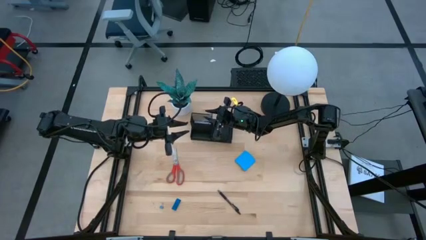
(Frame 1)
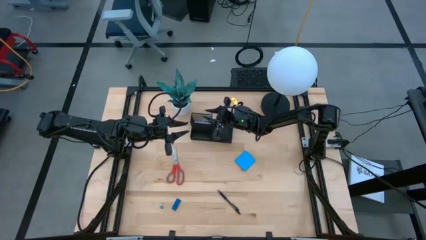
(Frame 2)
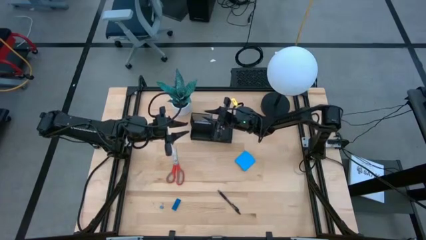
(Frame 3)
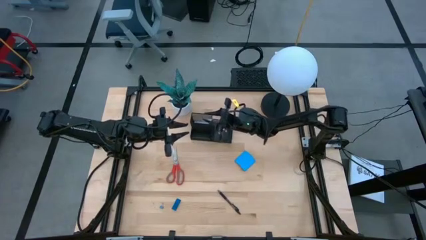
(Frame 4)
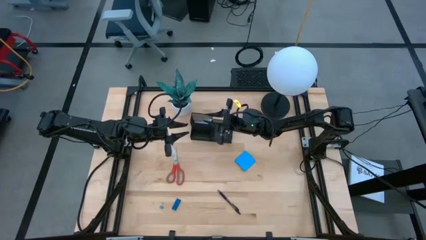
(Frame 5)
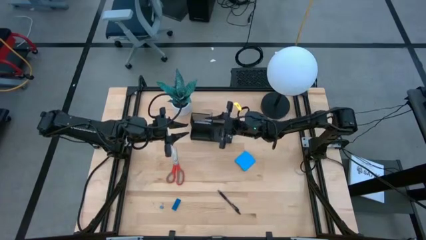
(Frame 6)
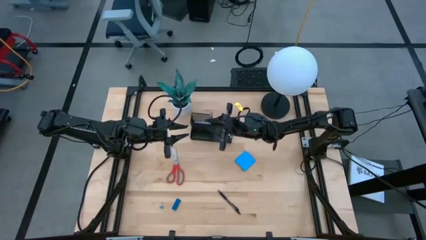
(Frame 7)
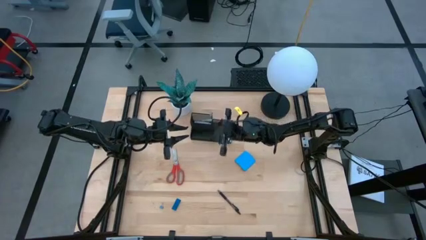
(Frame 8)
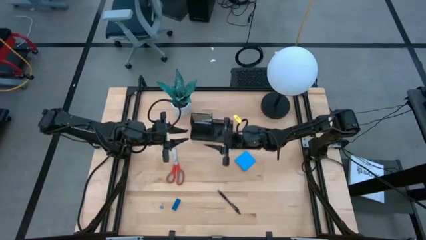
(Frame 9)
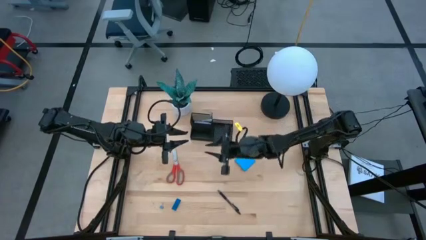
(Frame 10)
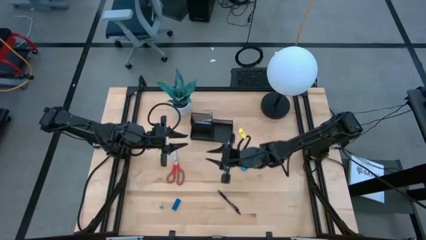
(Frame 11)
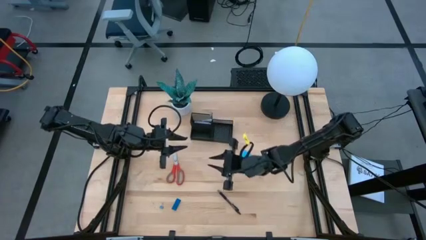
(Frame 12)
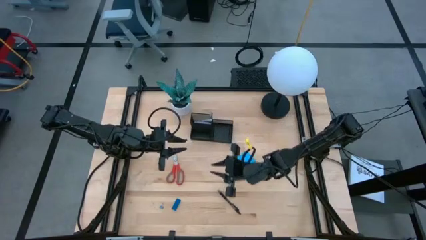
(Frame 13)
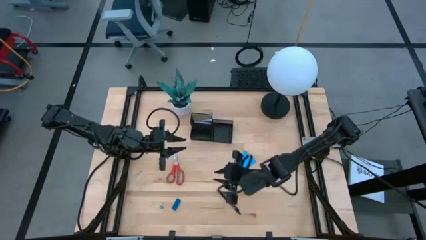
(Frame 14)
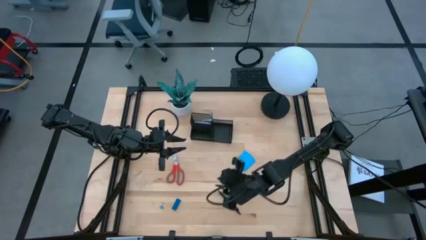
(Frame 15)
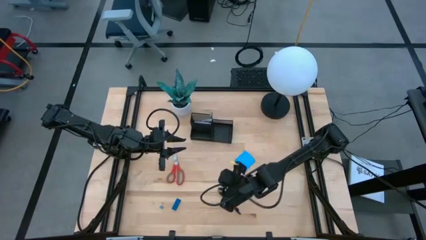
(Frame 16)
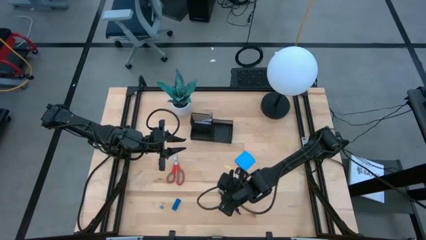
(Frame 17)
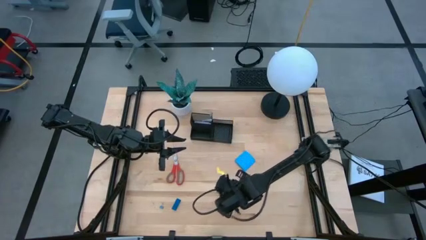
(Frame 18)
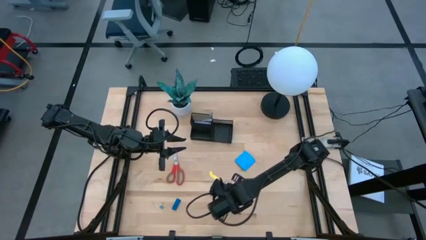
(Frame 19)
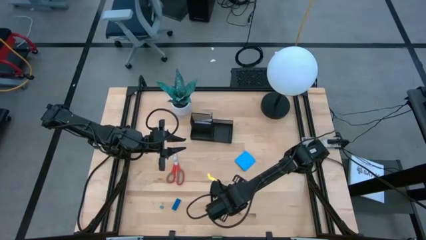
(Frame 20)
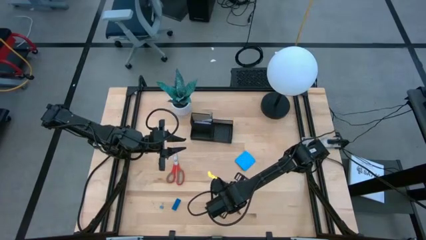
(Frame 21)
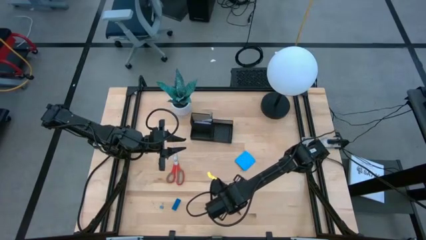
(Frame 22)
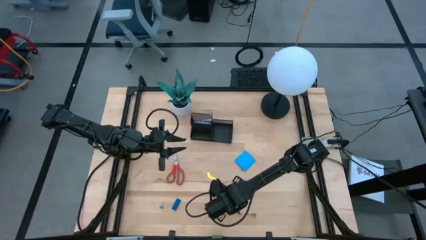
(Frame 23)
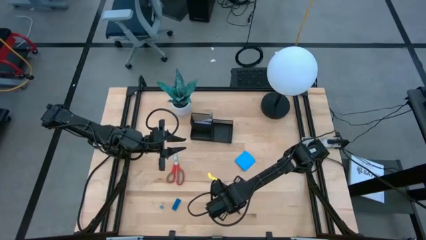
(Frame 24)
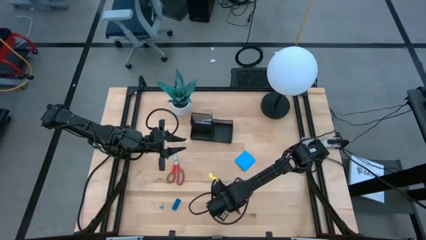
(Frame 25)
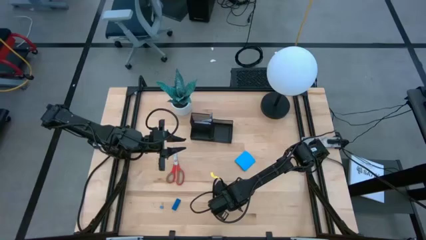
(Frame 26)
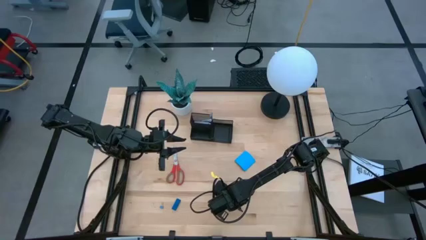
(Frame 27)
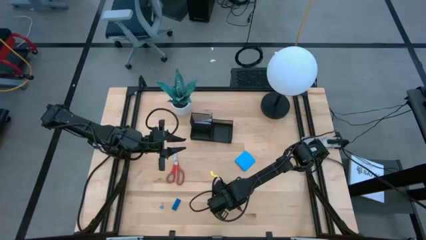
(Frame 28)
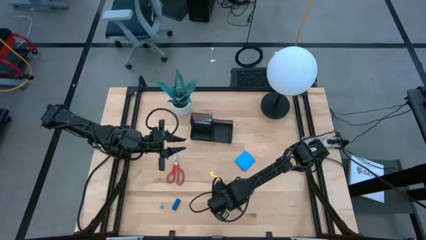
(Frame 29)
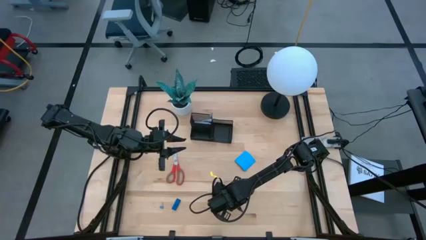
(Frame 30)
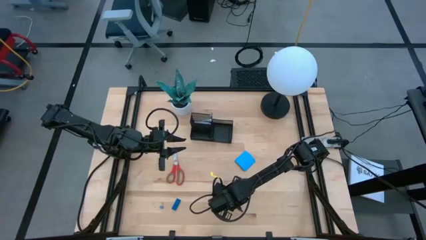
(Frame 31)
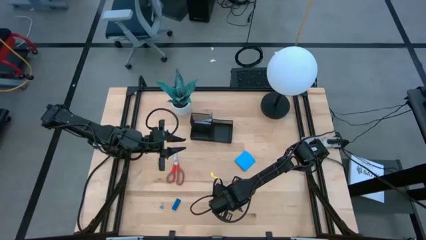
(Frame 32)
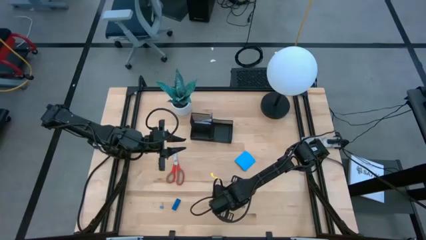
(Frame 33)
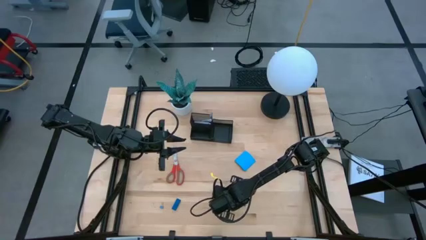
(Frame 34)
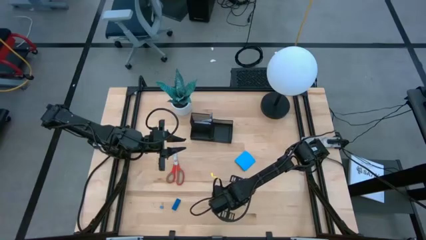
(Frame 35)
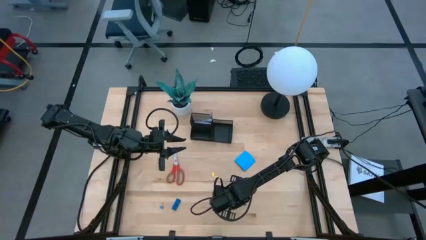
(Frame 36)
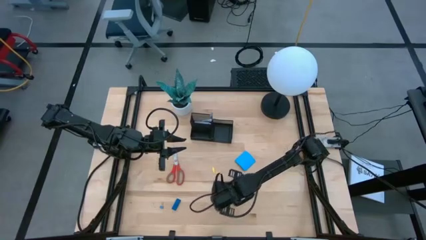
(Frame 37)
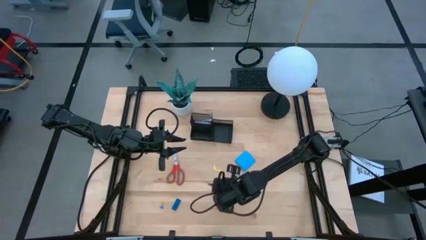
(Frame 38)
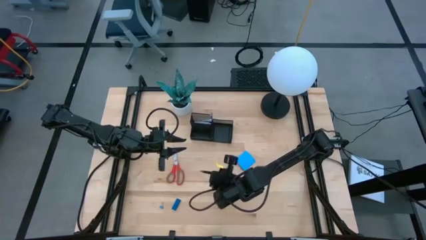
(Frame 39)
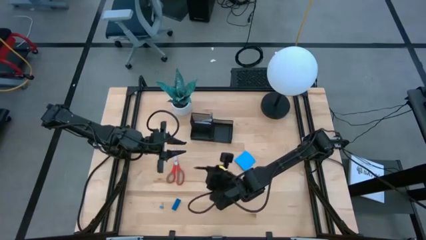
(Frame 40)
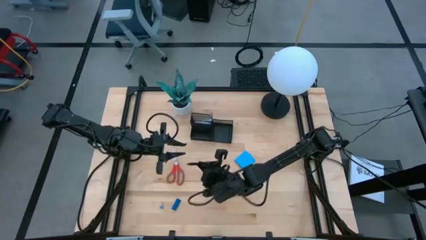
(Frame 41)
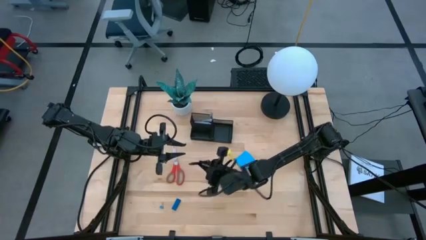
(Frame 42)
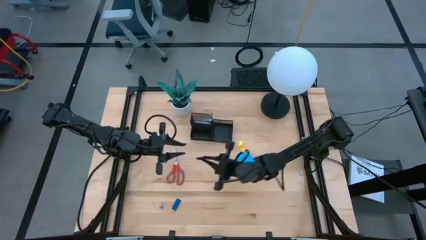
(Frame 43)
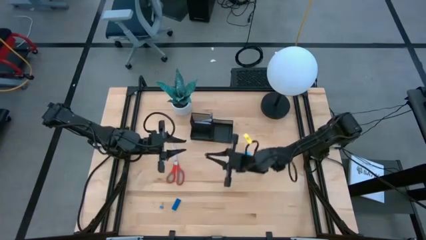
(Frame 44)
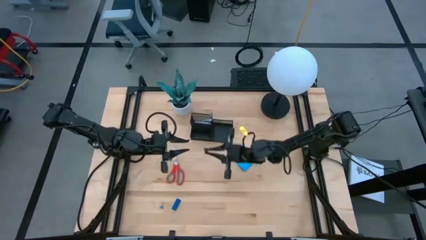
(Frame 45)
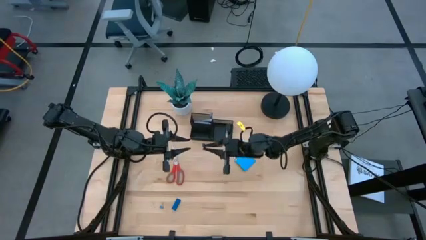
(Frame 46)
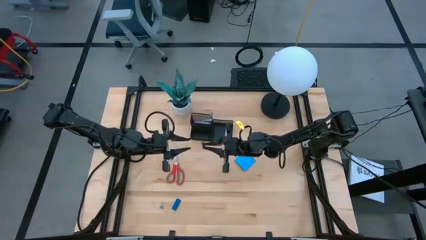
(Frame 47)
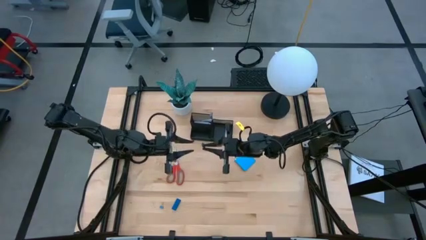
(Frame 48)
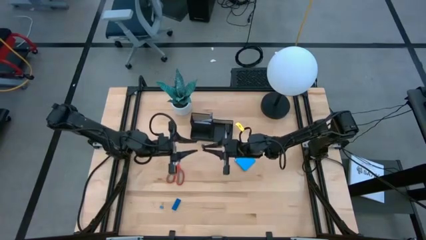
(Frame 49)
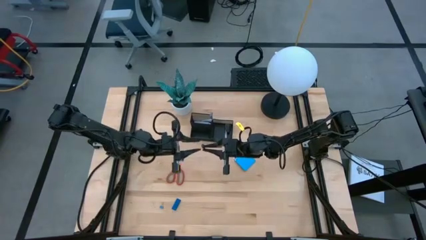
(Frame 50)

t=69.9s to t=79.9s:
Task: Pick and place office supplies into organizer
Put the black pen into the black desk organizer

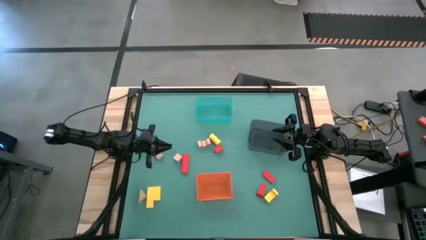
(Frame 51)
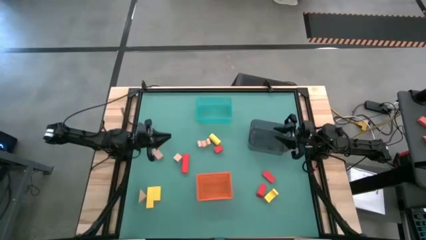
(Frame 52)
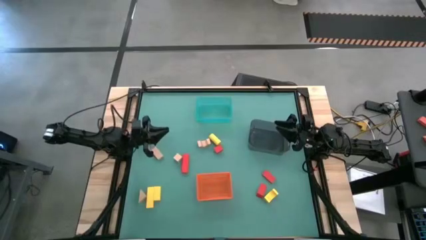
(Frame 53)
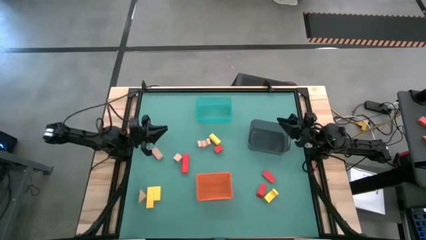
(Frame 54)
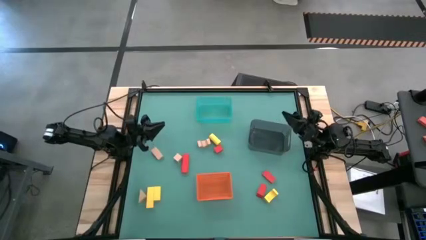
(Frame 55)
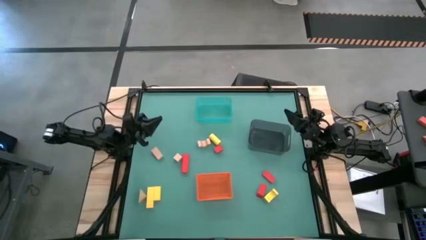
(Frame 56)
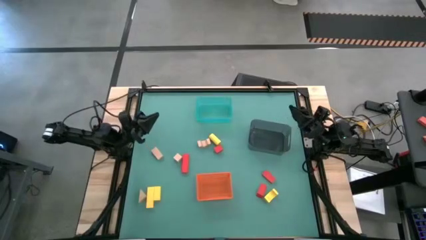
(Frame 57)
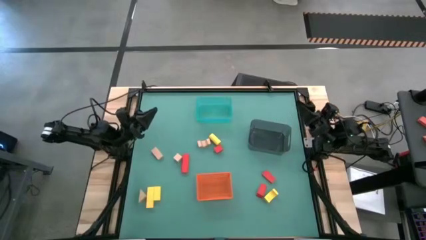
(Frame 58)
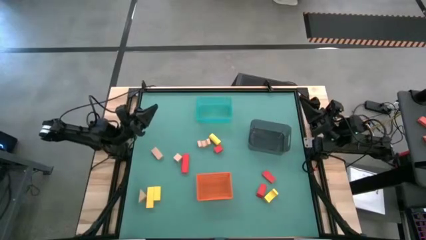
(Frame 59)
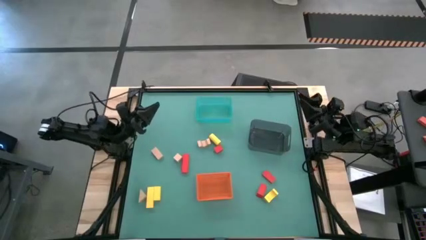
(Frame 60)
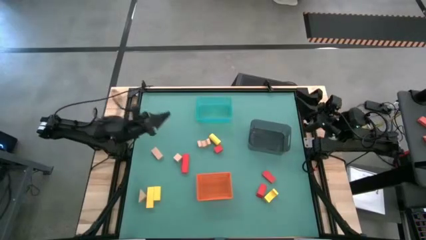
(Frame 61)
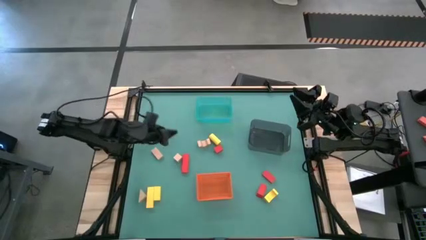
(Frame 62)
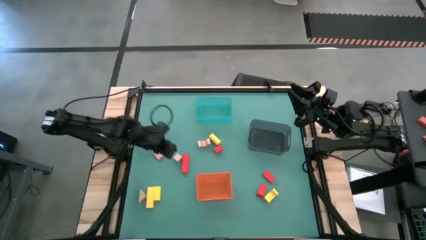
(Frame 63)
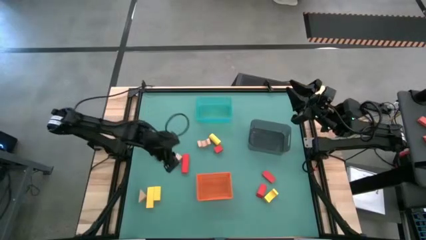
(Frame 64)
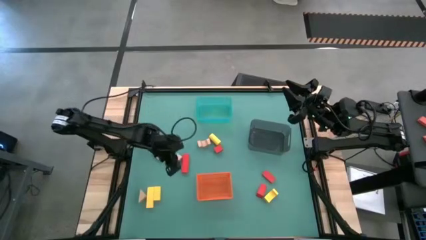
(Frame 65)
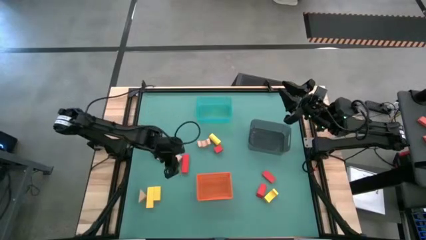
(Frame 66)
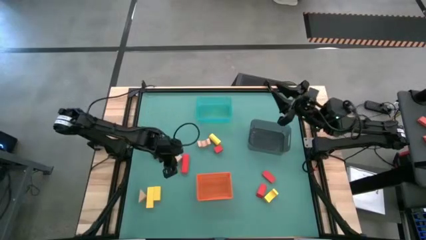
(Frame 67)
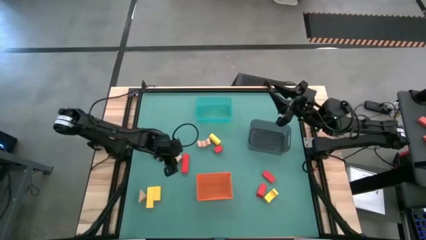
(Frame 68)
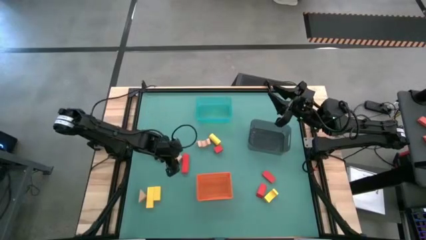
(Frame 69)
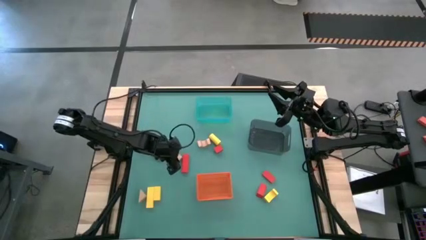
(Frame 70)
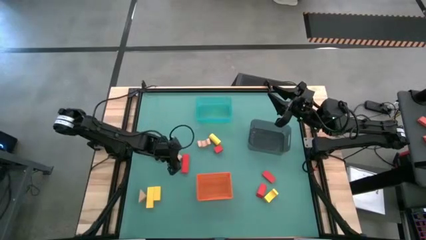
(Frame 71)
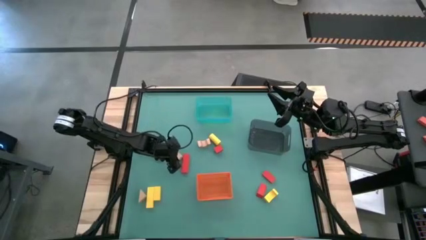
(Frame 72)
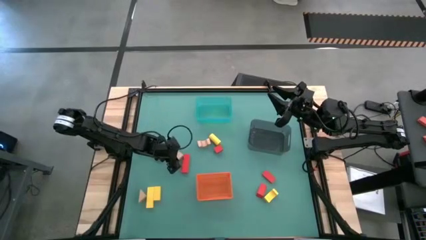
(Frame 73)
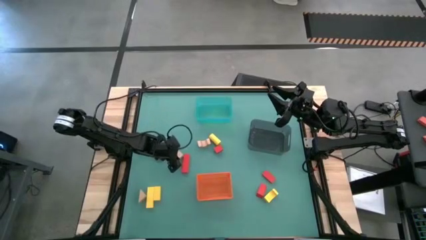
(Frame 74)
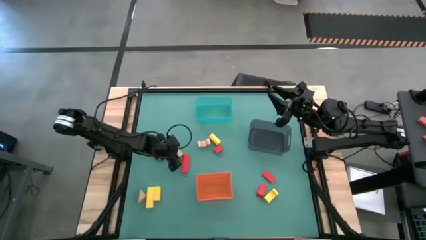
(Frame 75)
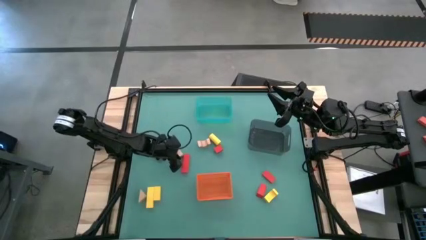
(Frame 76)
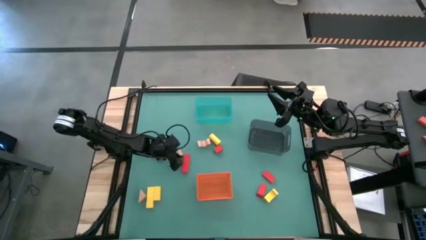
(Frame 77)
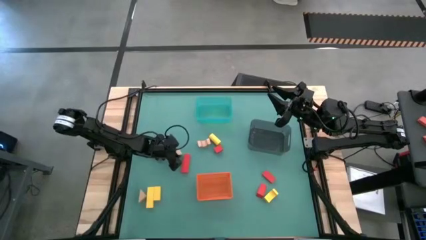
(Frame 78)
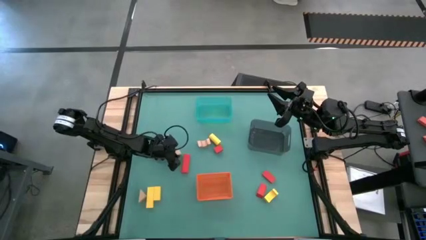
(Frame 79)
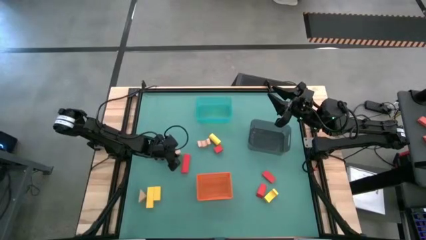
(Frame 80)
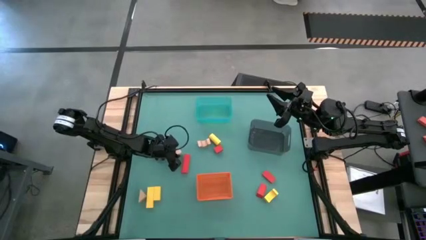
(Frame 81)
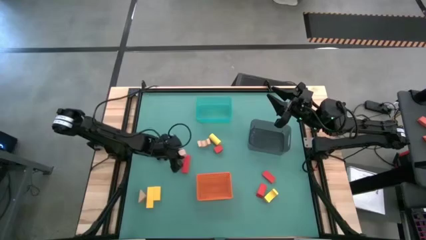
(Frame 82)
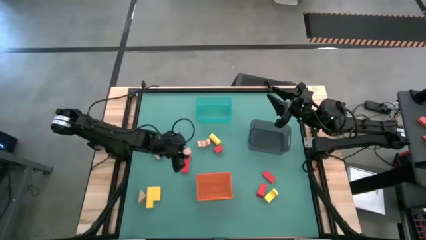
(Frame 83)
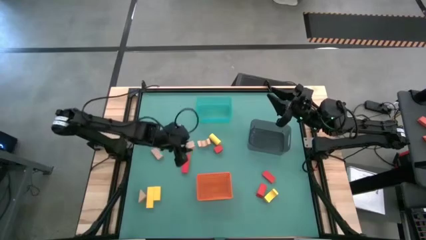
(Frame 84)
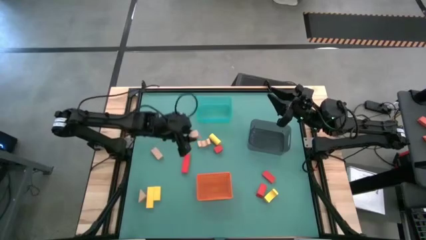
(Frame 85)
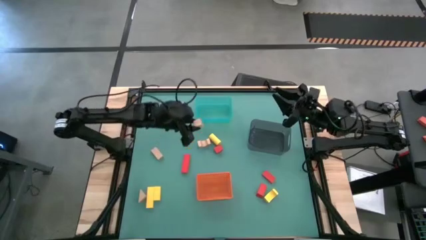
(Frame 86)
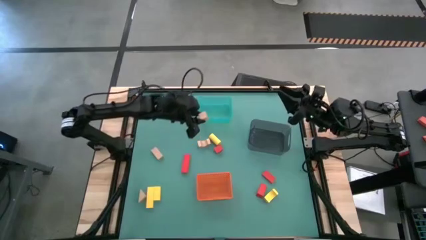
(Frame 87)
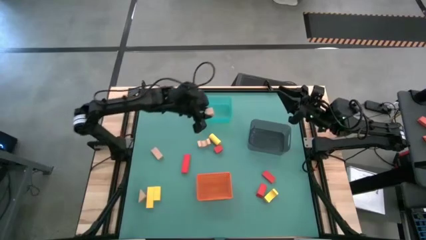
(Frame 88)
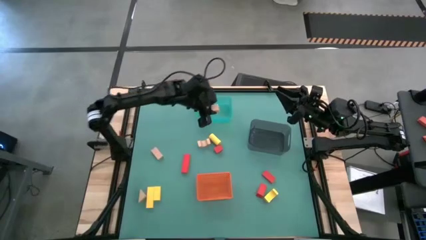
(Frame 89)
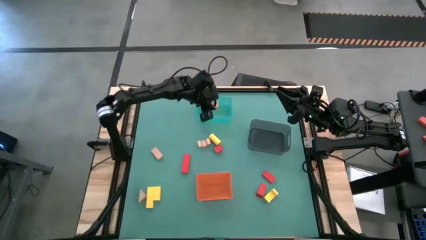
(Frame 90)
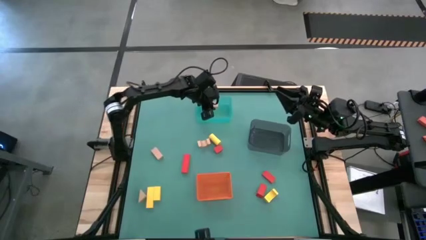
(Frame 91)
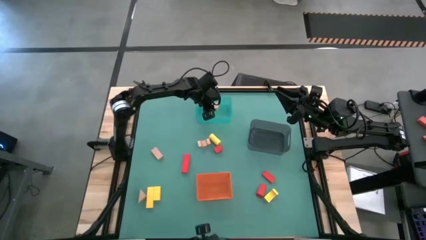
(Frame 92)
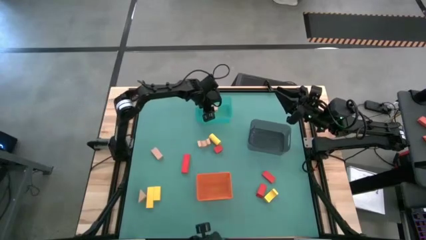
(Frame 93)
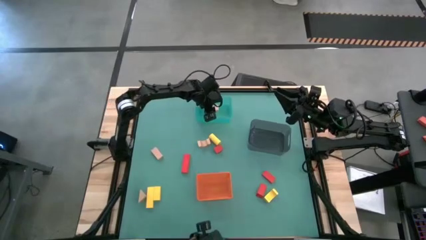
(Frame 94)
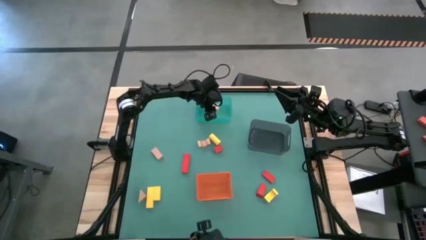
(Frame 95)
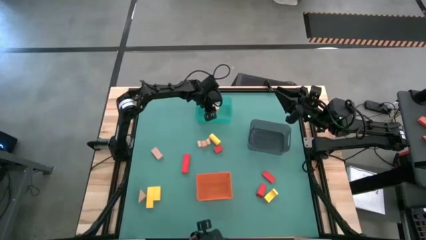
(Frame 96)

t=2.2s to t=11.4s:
Task: Sort & place blocks by color
Put the brown block into the green bin
